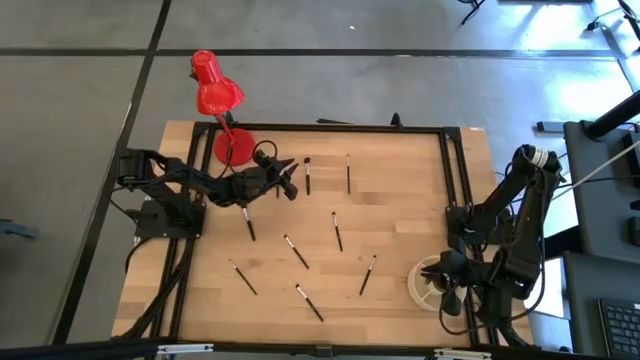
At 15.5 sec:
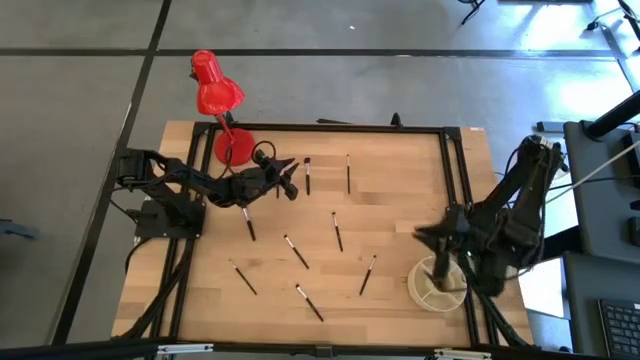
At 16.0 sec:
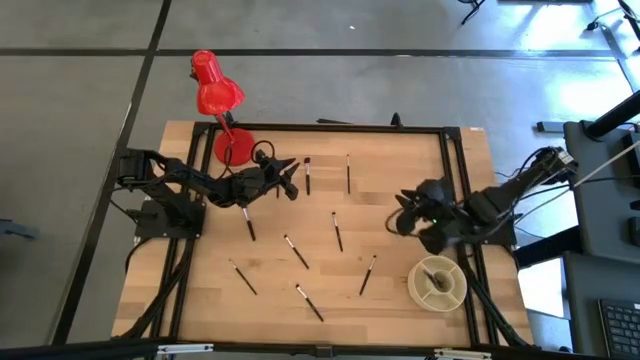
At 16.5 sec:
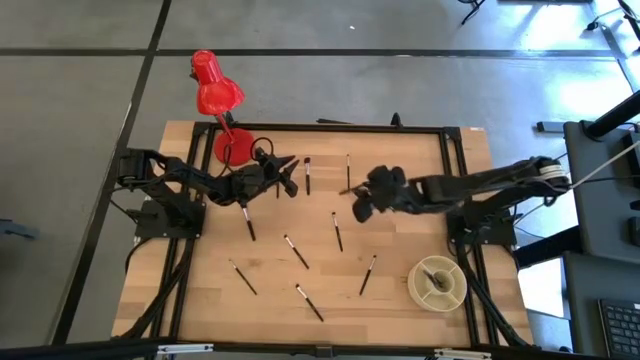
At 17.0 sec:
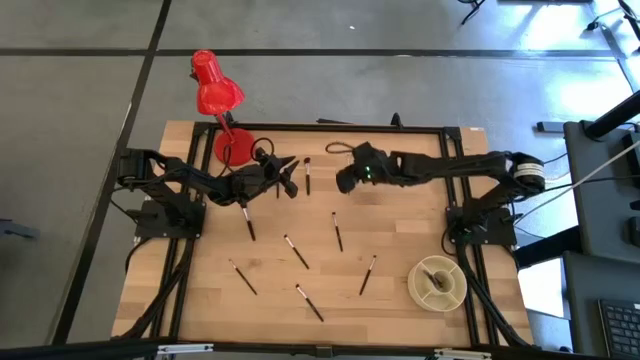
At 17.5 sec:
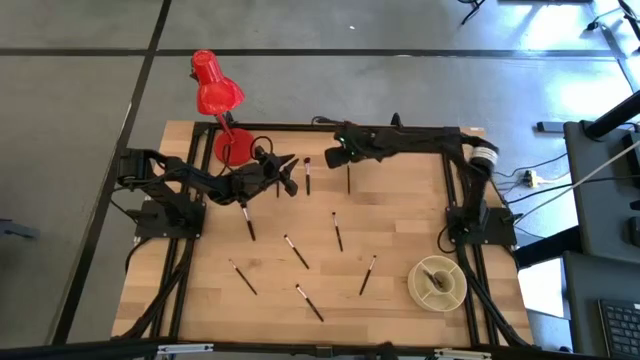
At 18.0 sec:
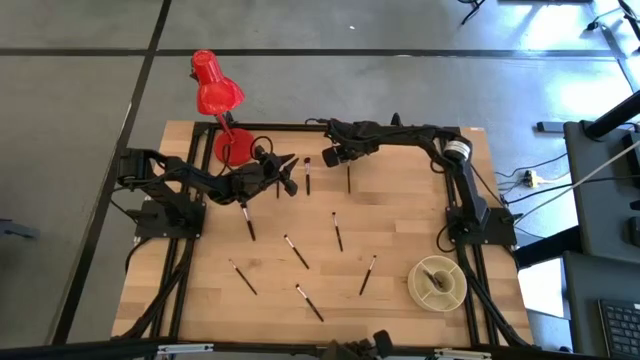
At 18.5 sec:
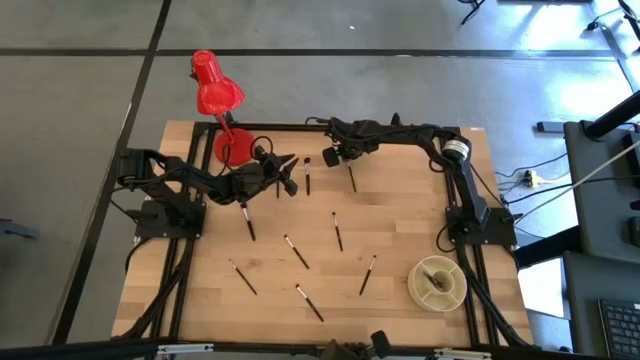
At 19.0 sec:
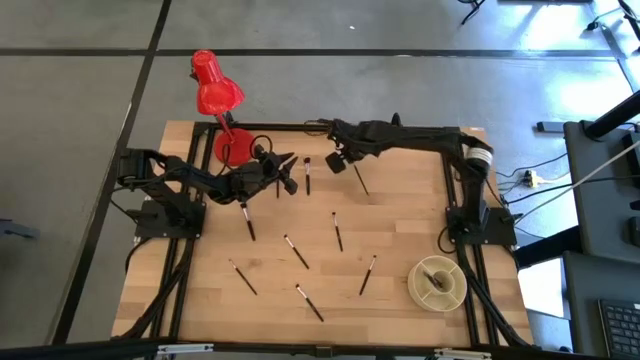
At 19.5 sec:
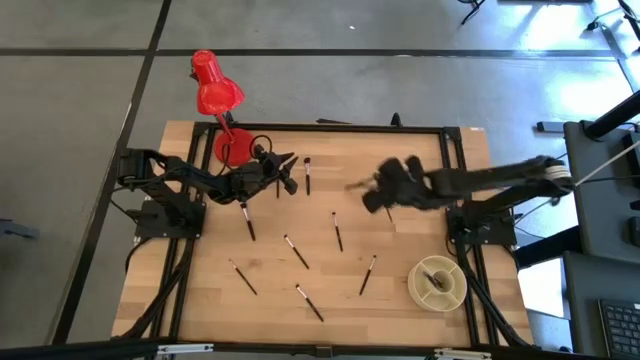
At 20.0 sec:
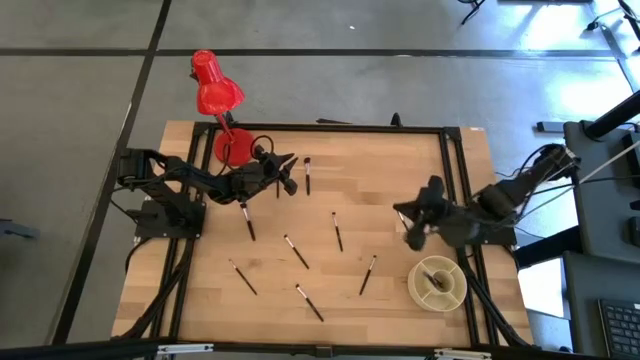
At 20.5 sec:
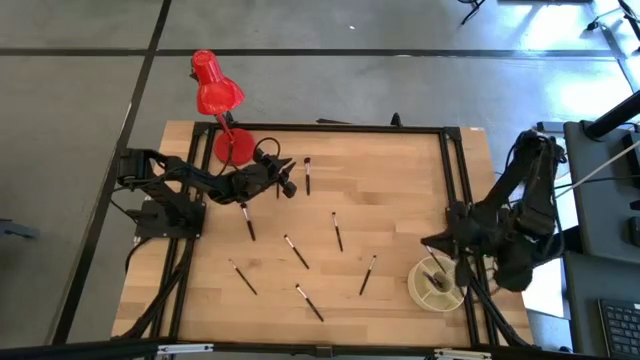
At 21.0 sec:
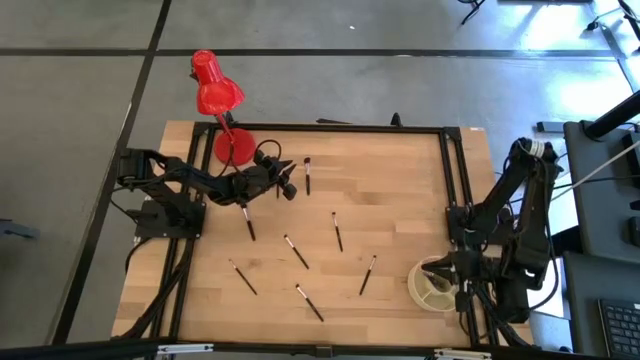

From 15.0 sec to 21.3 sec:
Task: Pick & Place Makeup Supplies
Put the makeup brush into the organizer

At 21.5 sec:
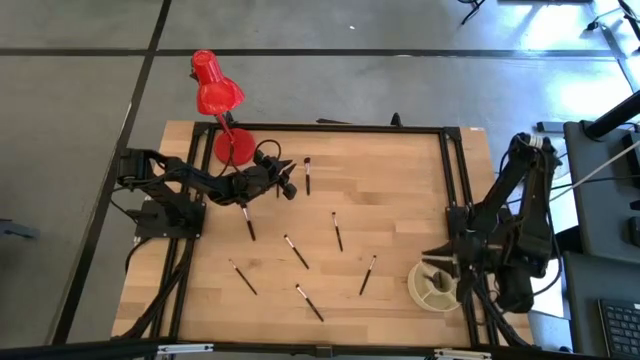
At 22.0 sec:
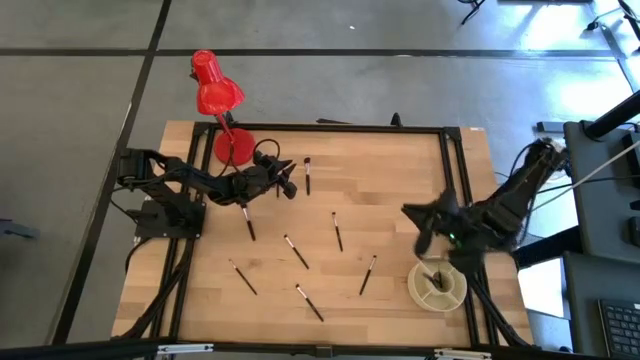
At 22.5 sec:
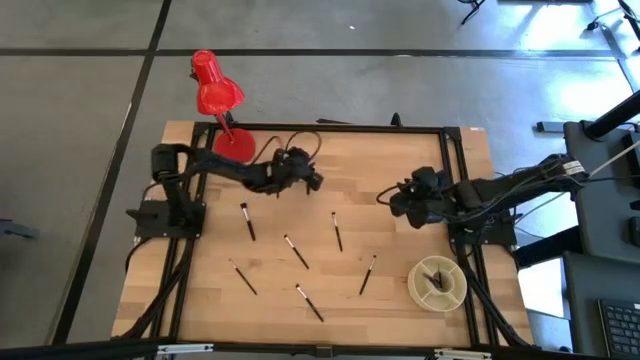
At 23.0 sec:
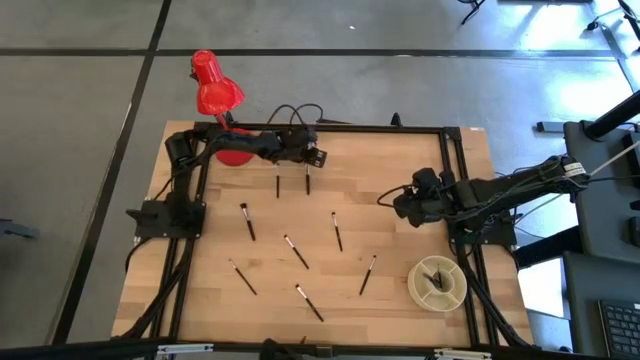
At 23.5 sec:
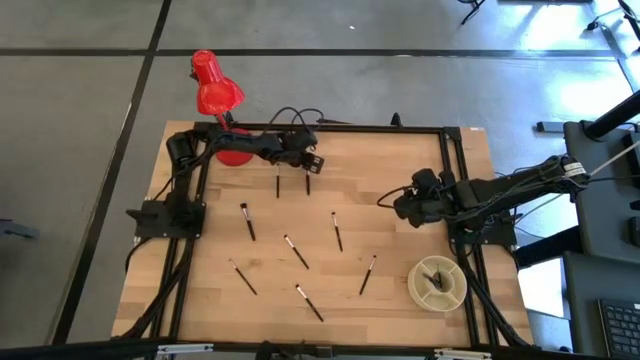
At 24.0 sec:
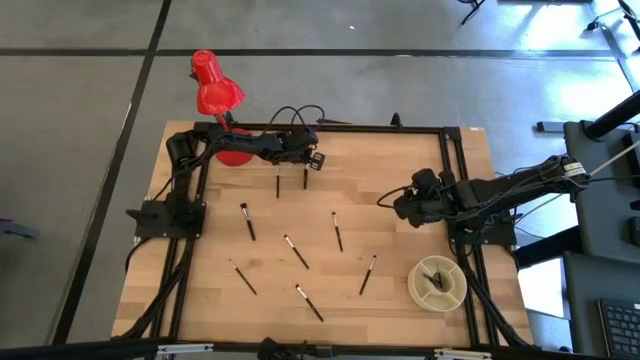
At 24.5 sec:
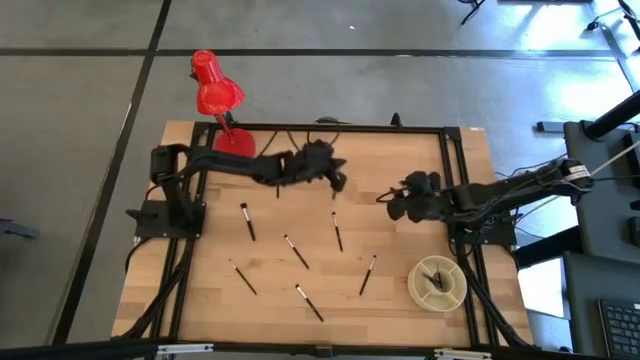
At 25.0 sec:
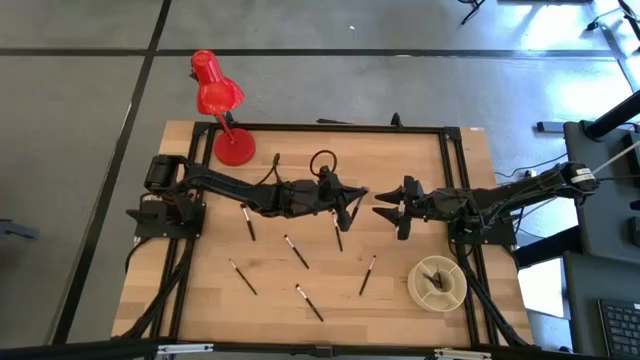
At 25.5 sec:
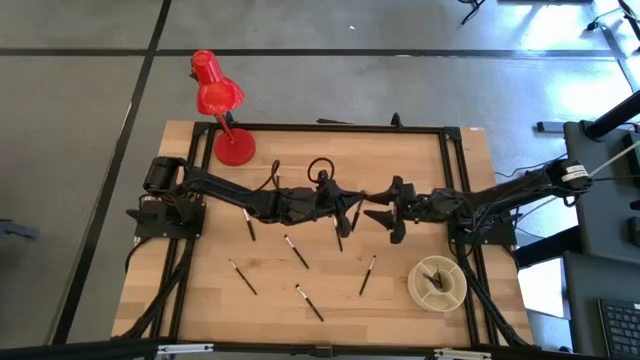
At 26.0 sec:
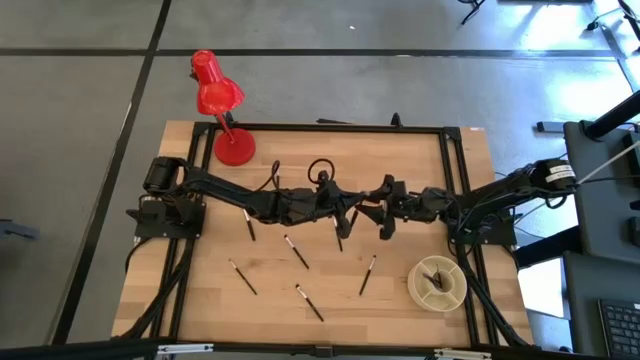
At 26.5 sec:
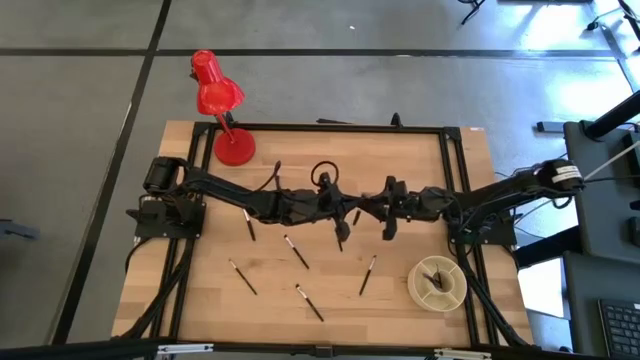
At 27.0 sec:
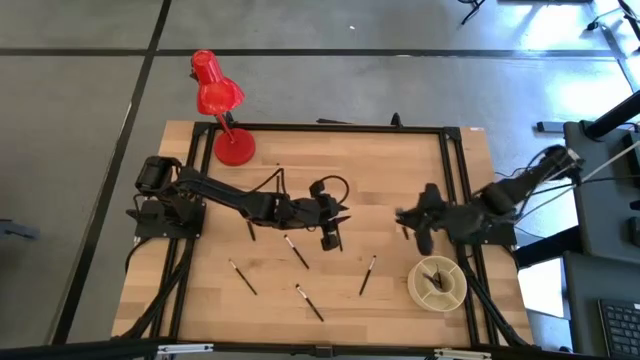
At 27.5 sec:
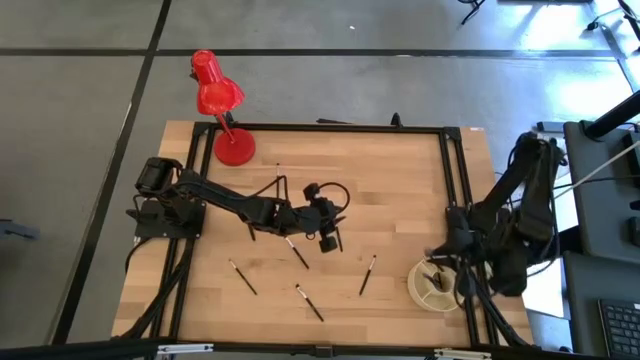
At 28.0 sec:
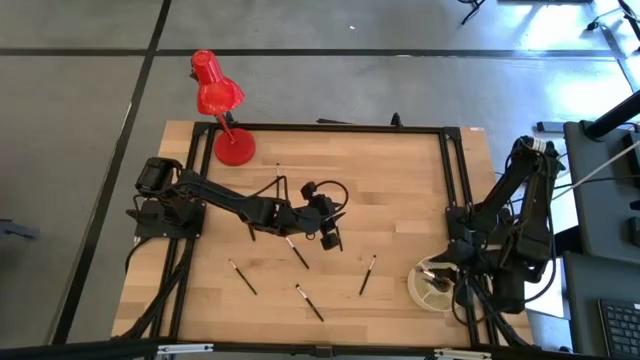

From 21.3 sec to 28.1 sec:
Put the makeup brush into the organizer

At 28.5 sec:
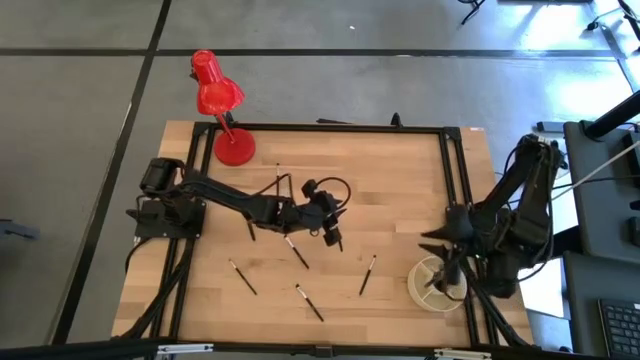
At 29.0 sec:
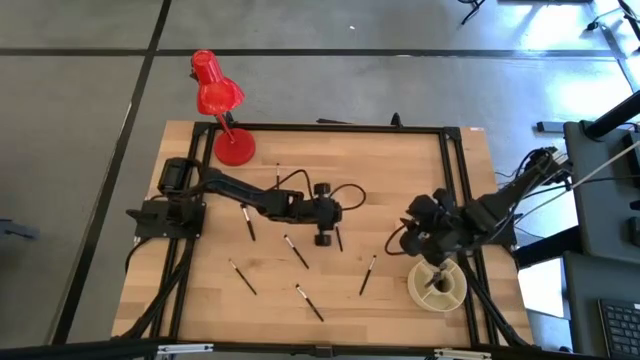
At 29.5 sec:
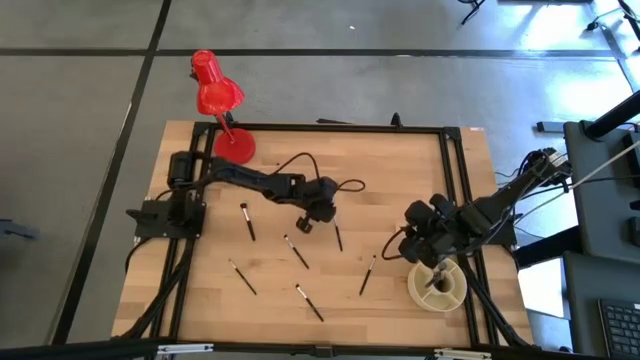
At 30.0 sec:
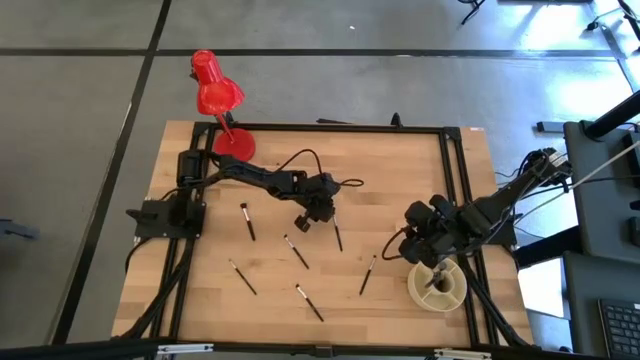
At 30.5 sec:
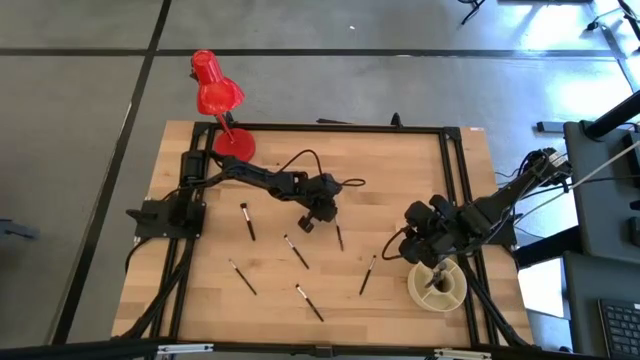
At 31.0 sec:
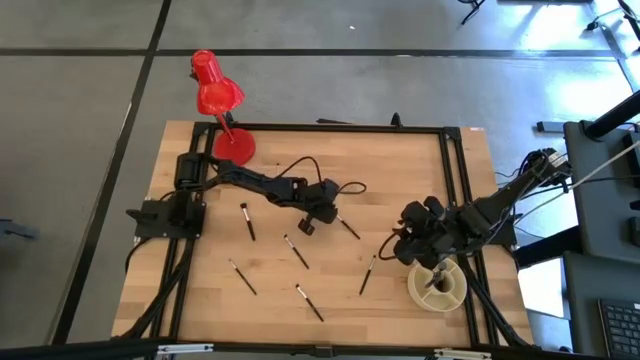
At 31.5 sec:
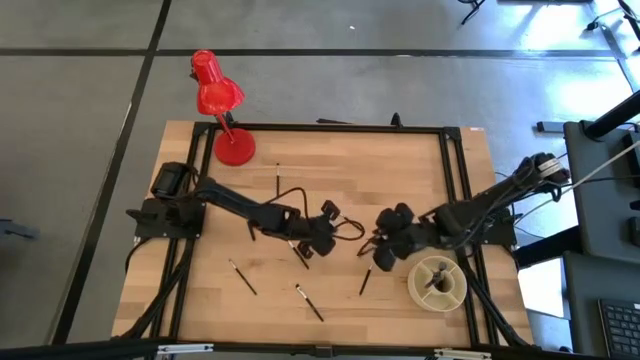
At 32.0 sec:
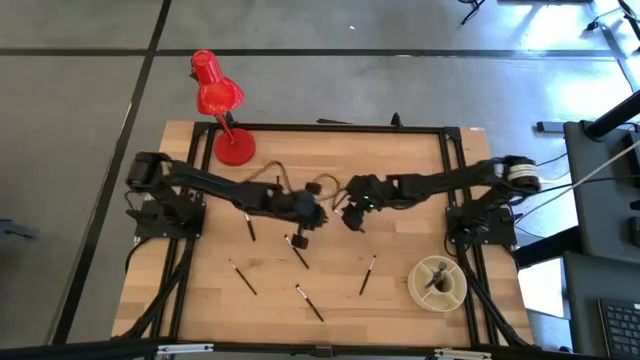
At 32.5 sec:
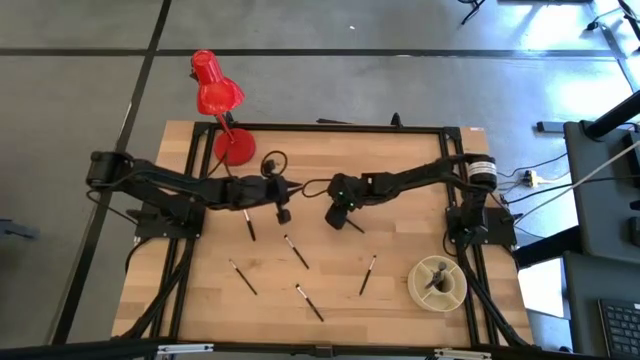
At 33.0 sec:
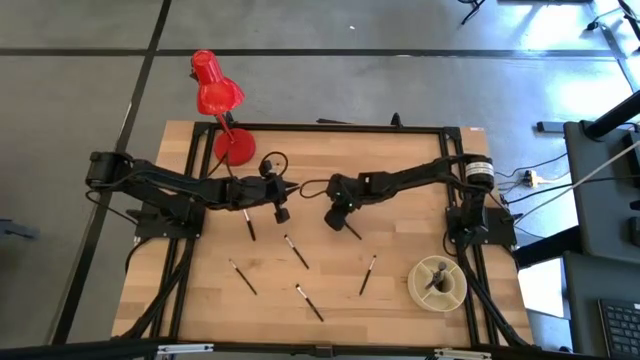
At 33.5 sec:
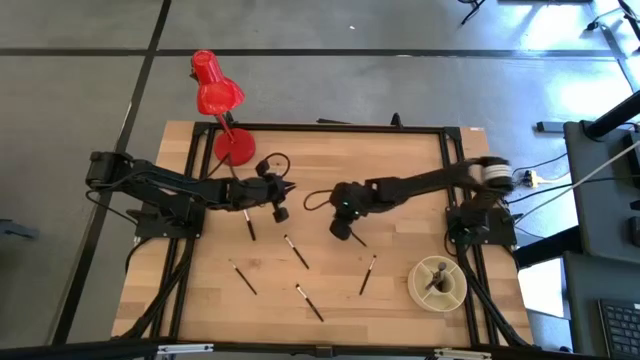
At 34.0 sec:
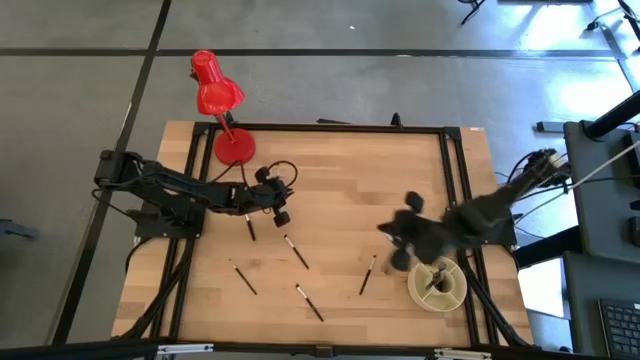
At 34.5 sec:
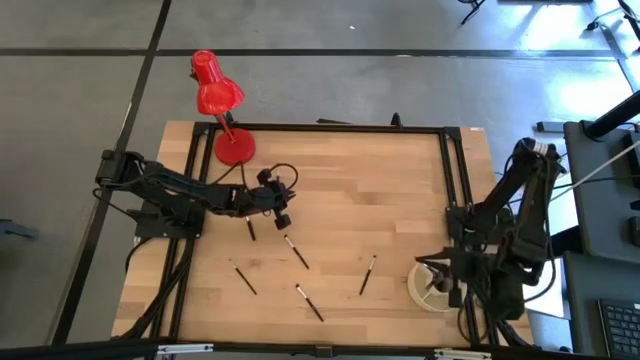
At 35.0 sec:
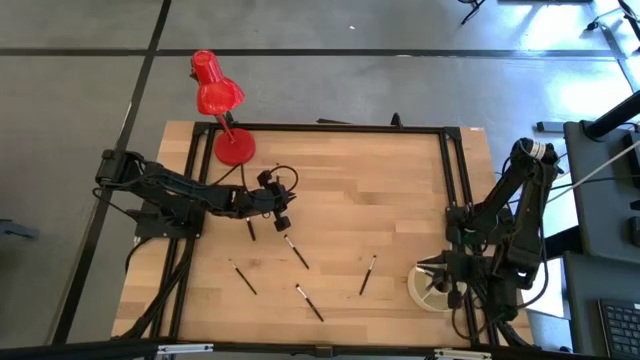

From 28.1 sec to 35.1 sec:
Put the makeup brush into the organizer

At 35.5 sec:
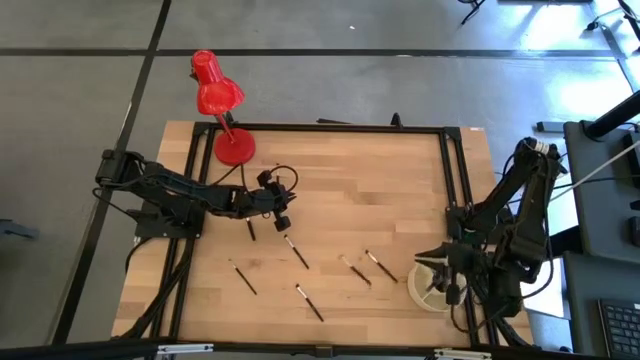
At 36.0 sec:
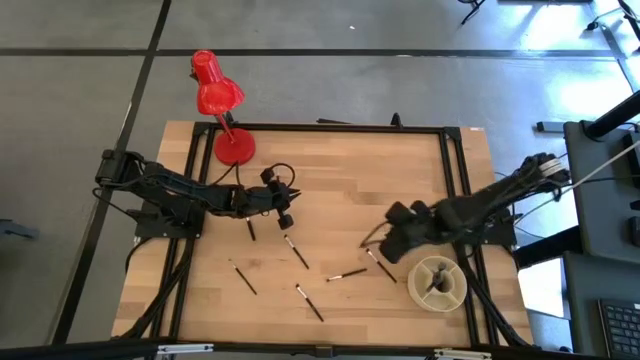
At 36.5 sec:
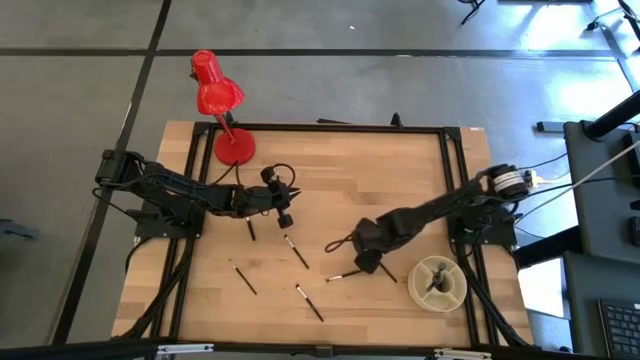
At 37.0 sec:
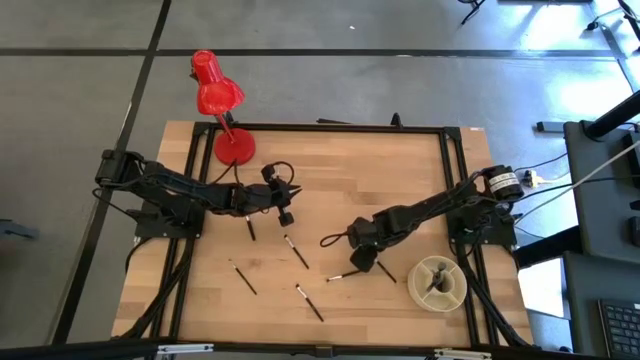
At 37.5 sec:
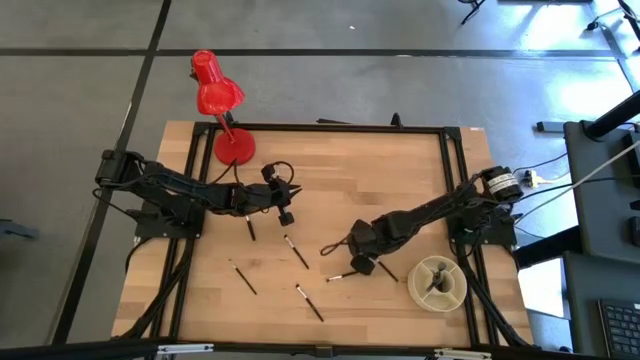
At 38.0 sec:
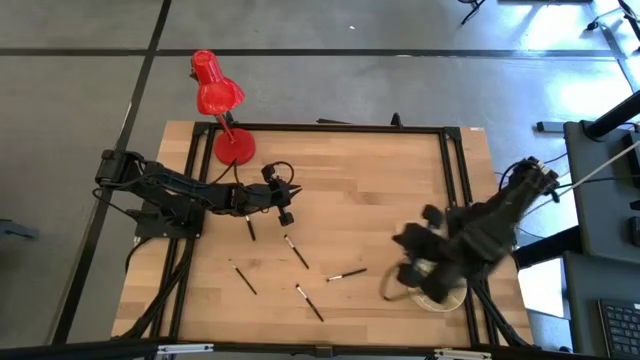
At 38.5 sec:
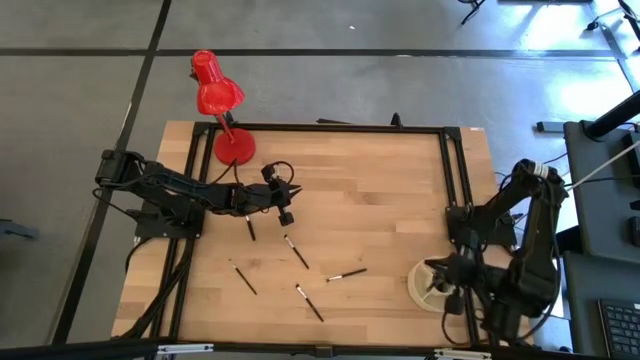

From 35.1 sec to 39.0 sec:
Put the makeup brush into the organizer
